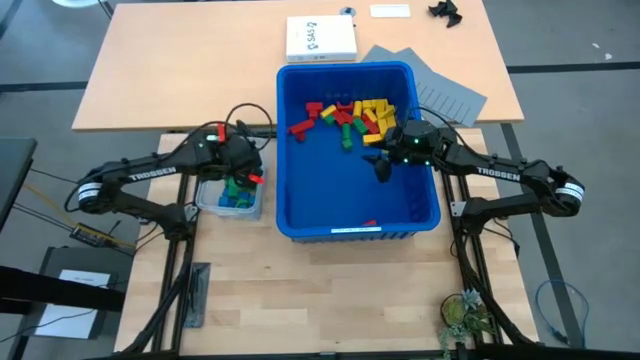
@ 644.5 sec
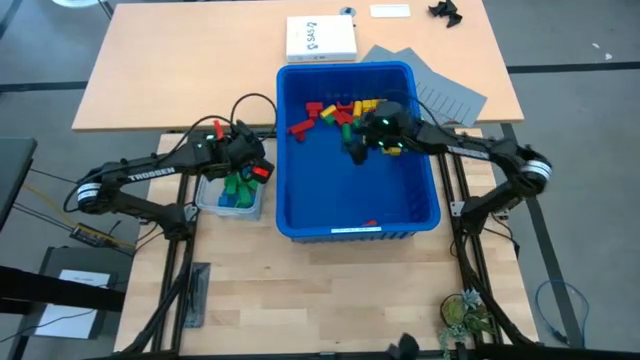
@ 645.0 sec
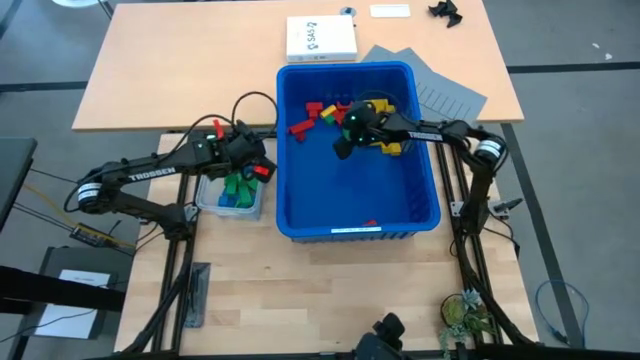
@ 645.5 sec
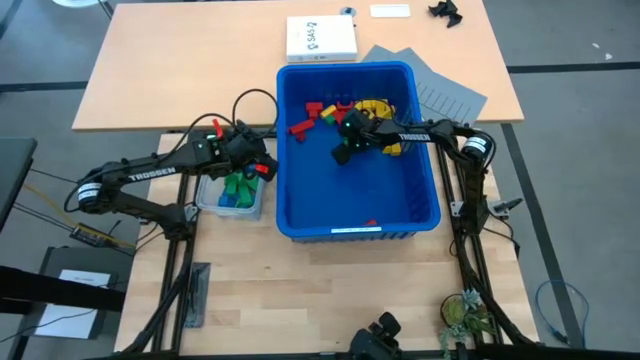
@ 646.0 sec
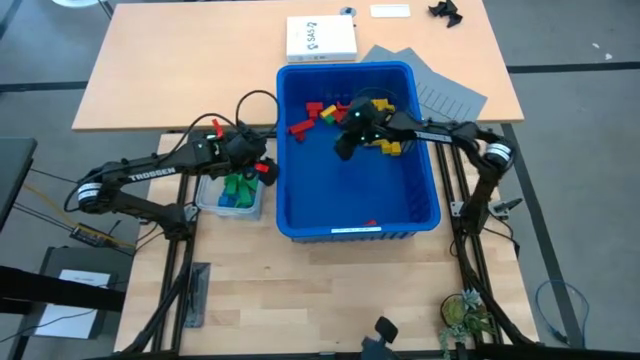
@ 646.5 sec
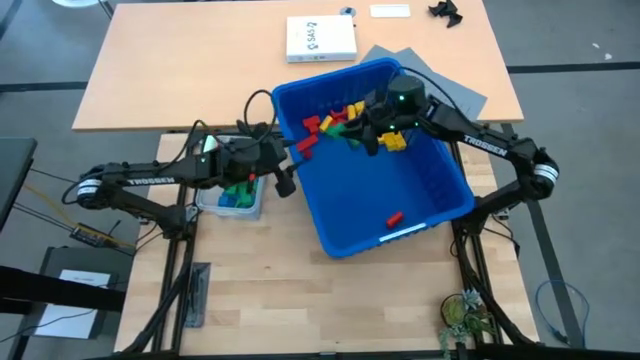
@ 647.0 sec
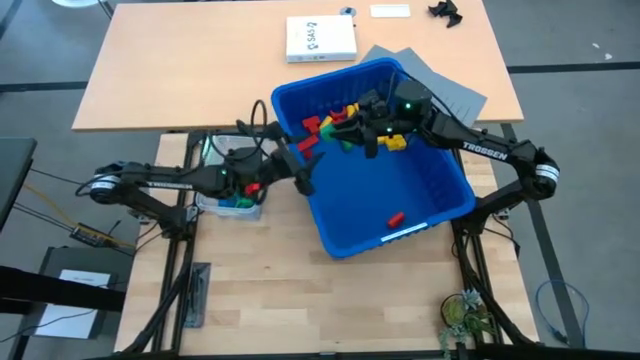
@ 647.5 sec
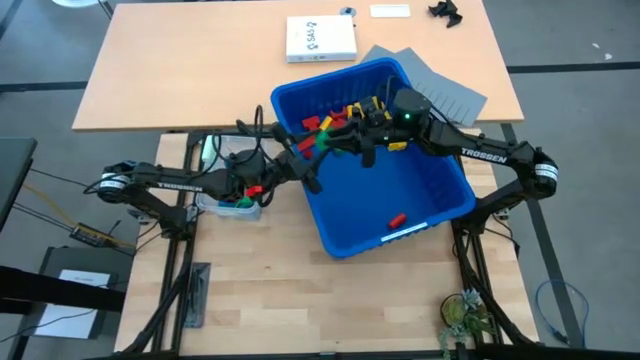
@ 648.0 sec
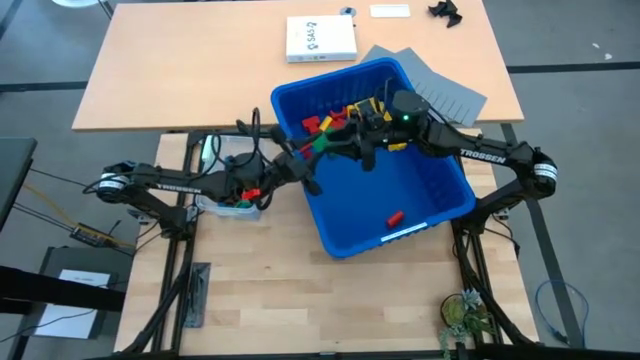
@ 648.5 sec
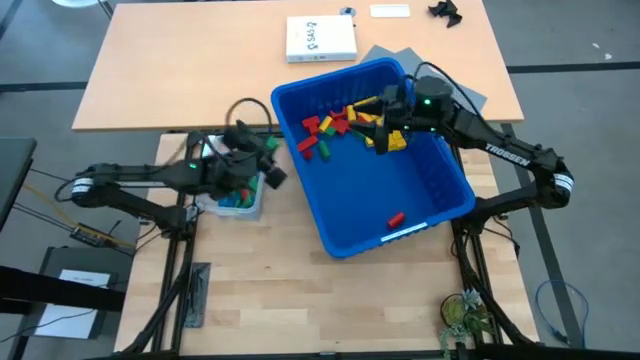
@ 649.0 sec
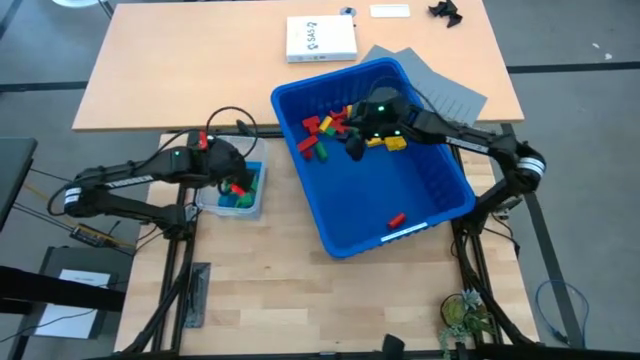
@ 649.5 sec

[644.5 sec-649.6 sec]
Task: Sort blocks
Put the green block into the transparent bin

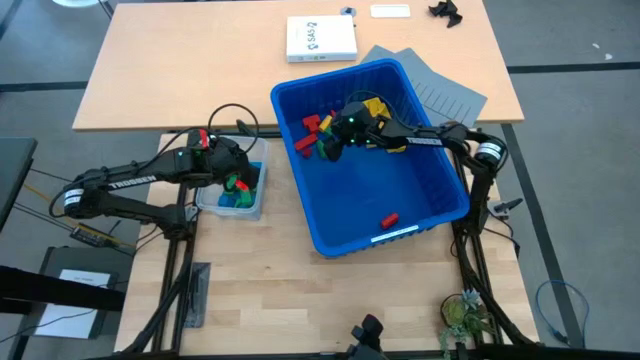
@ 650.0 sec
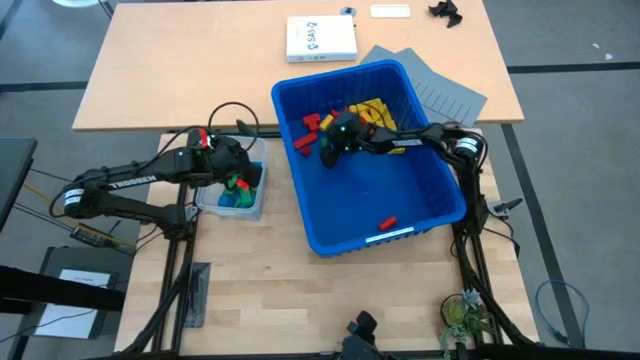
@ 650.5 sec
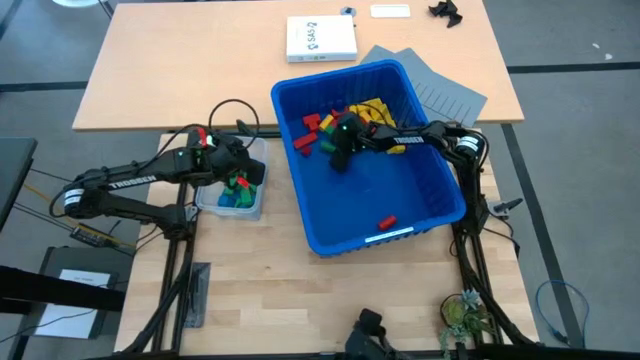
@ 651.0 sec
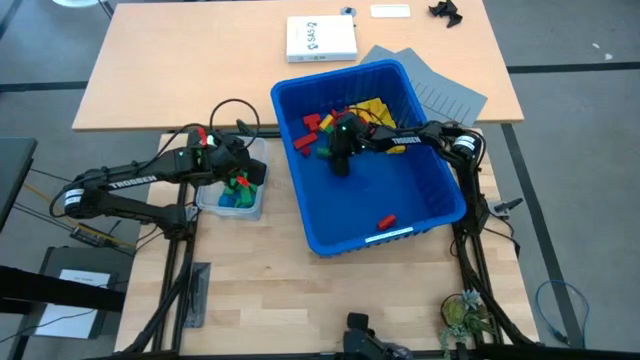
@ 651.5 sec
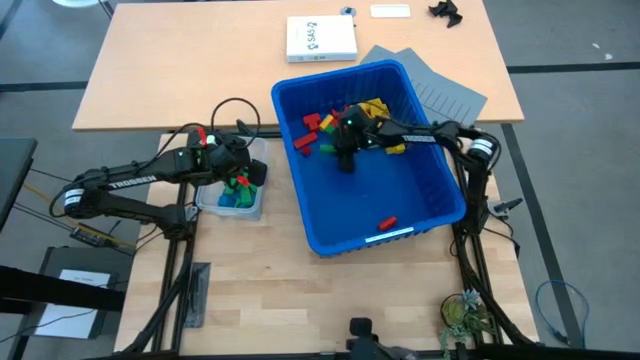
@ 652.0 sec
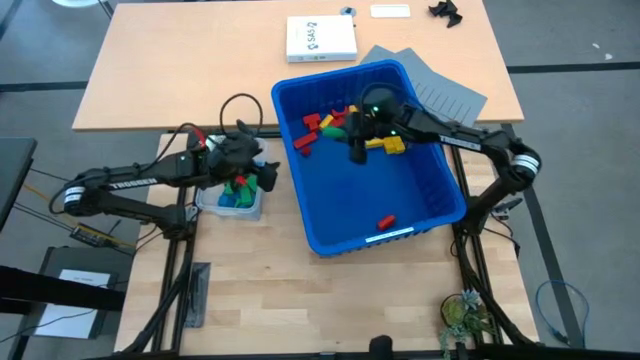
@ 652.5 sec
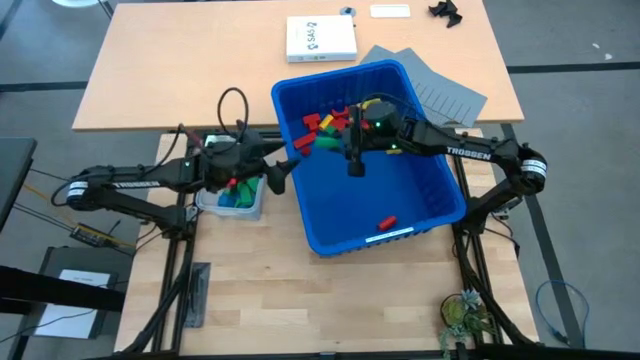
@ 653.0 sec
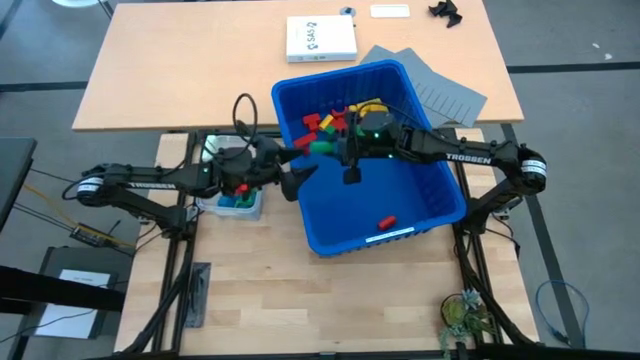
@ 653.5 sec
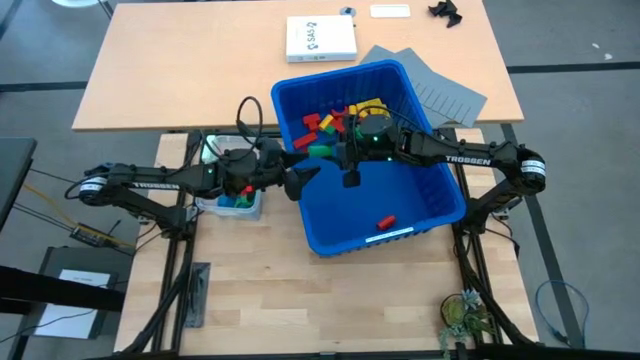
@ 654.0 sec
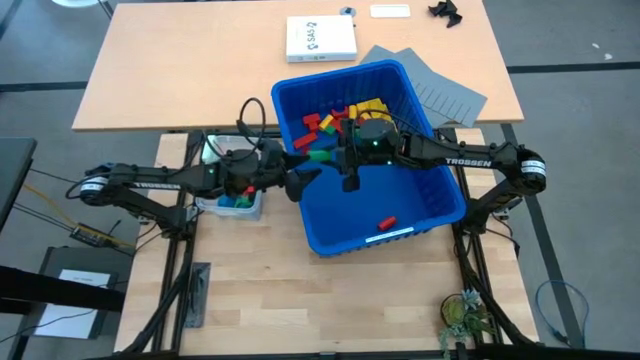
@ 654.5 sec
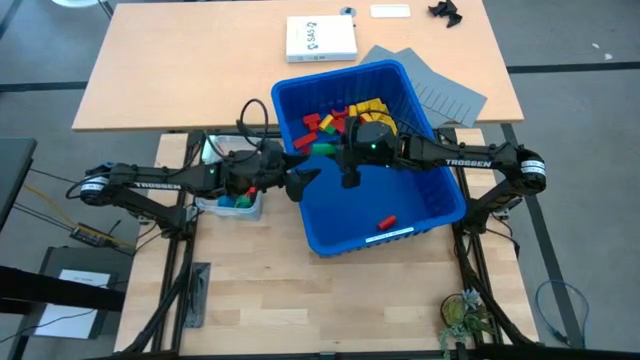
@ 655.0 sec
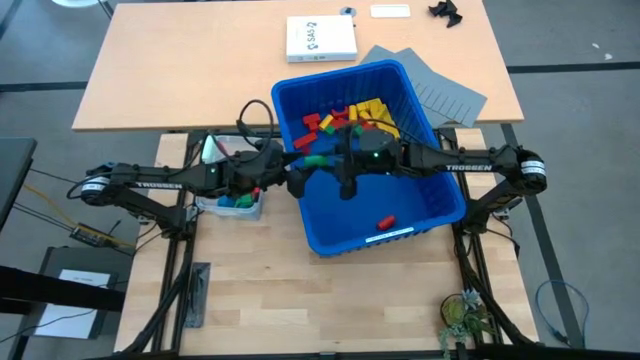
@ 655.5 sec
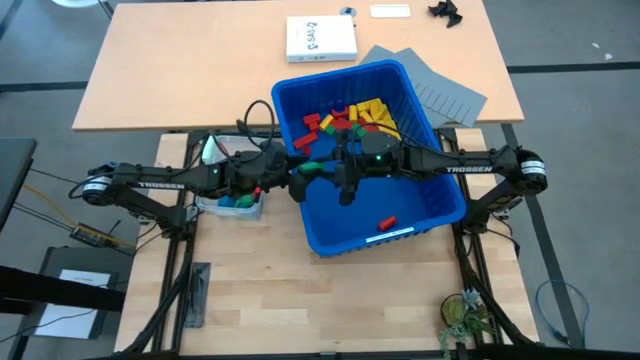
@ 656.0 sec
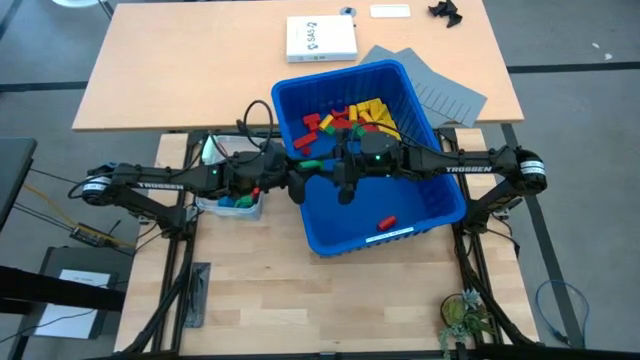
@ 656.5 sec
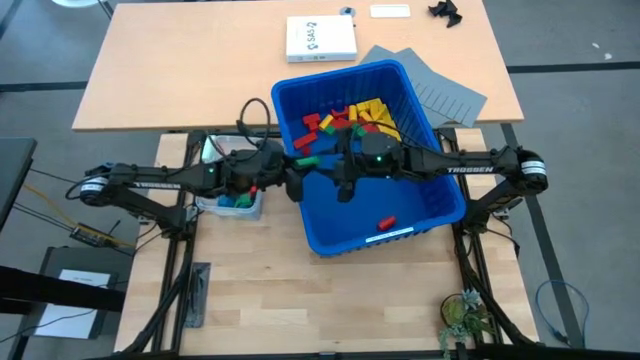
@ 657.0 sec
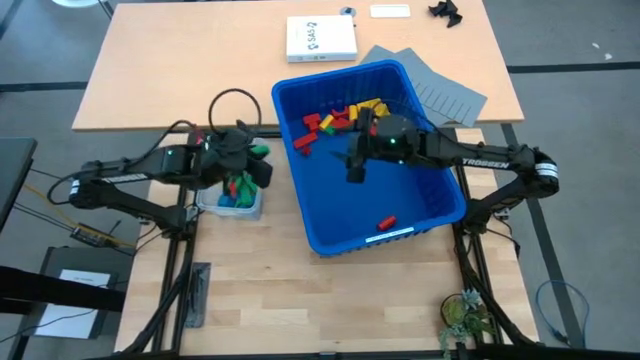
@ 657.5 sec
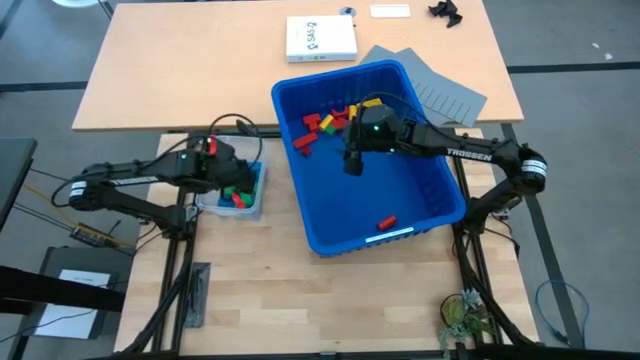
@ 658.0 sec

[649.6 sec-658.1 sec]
Put the green block into the transparent bin

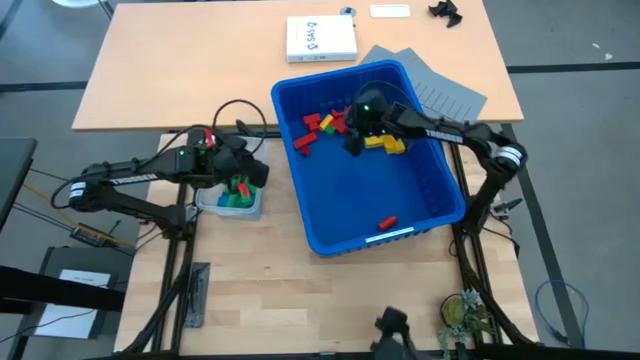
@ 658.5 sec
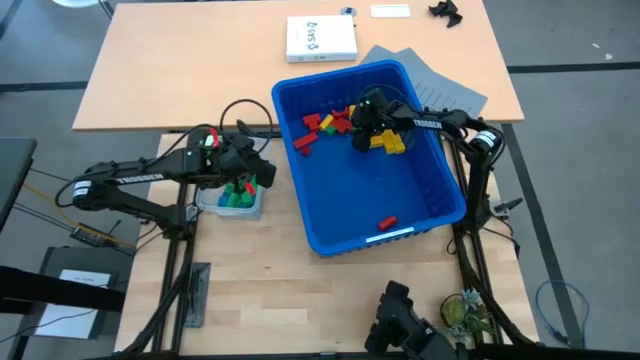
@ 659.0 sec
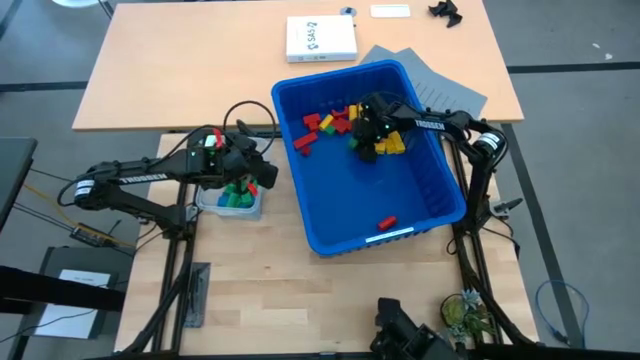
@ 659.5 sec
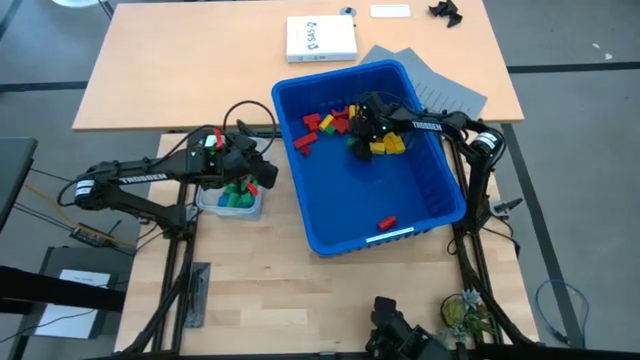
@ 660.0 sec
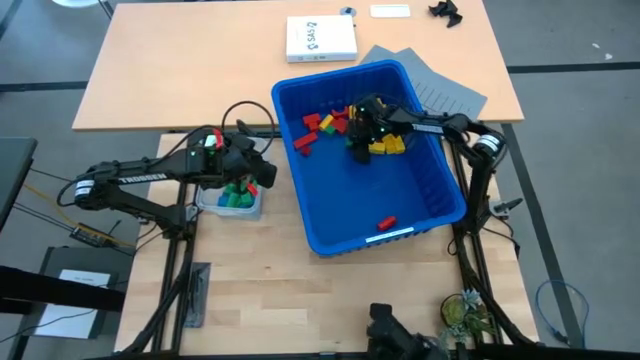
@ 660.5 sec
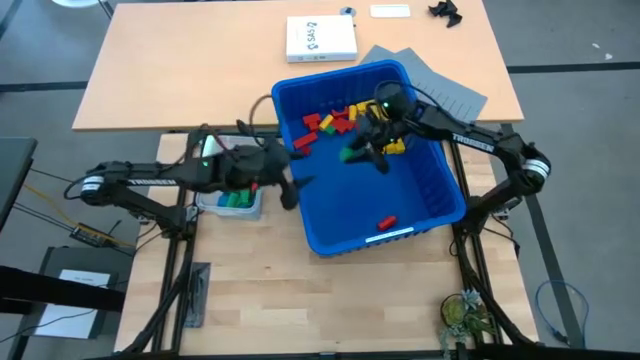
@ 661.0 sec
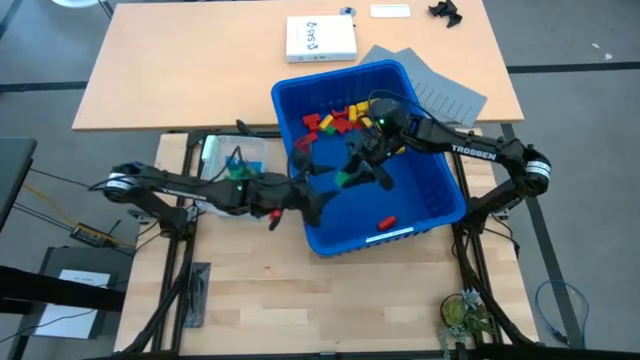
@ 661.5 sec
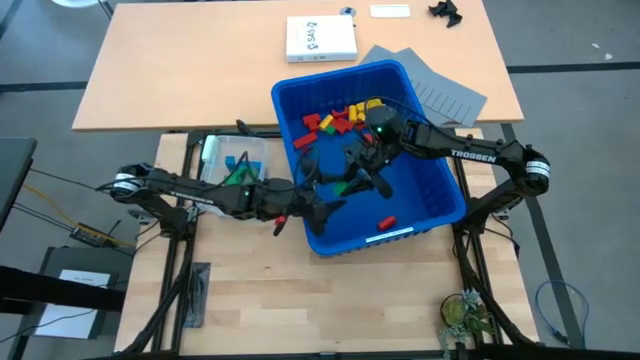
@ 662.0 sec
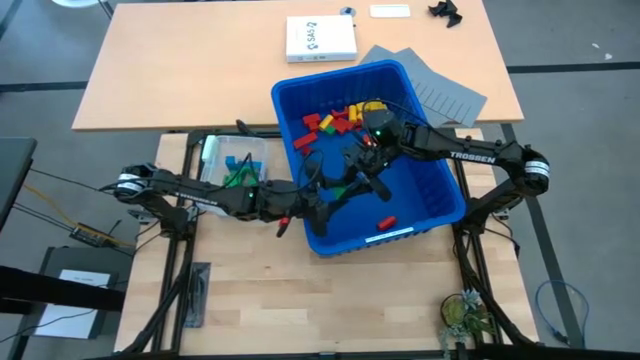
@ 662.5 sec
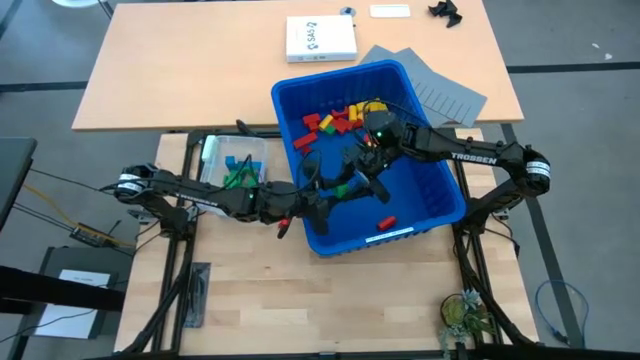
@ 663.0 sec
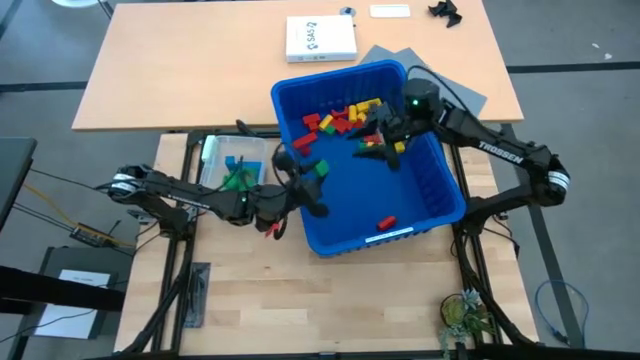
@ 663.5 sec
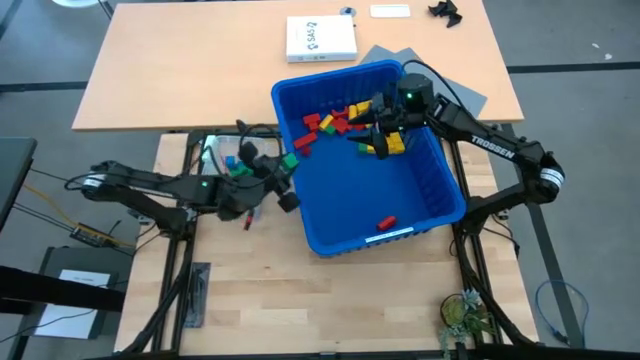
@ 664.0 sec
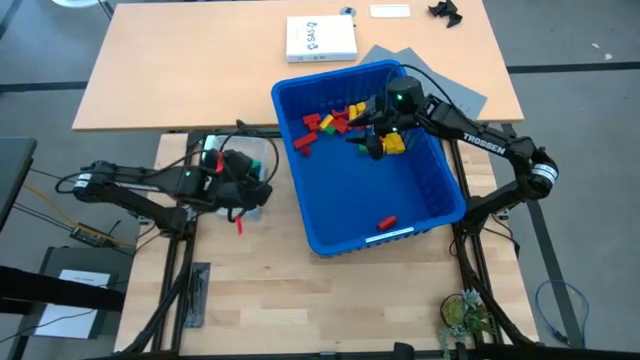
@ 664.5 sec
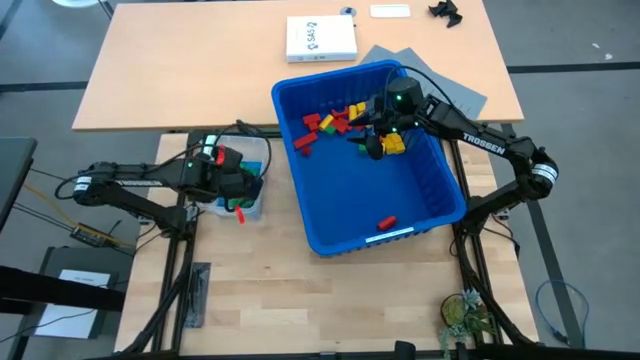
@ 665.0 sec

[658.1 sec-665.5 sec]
Put the green block into the transparent bin
